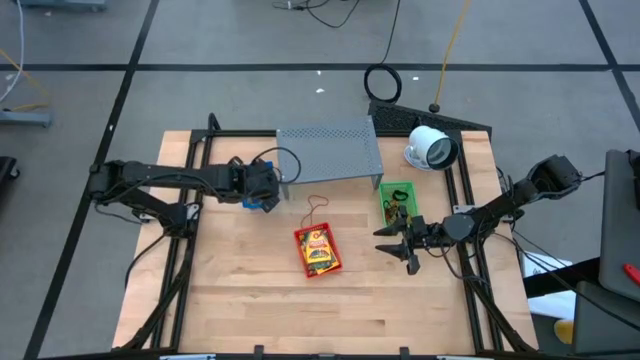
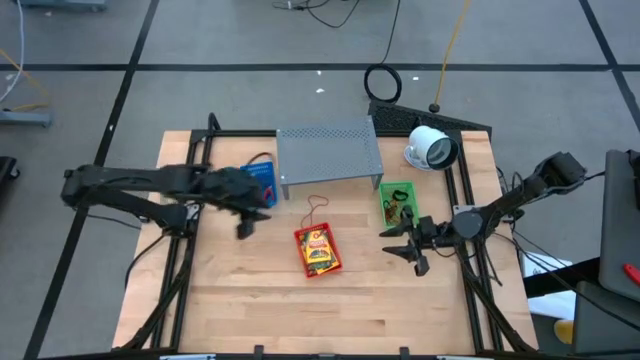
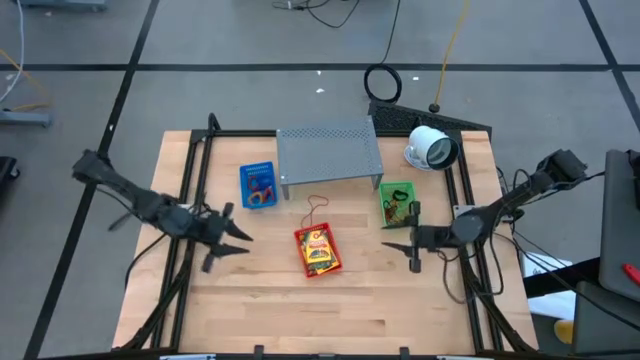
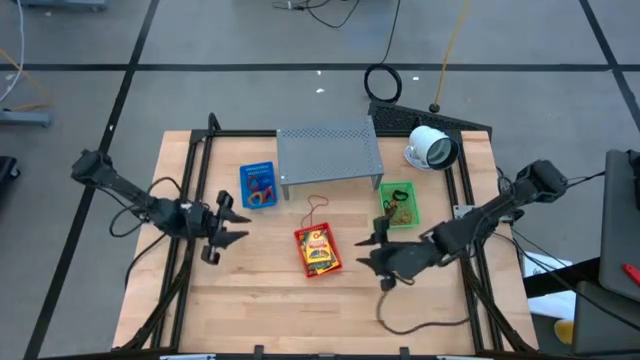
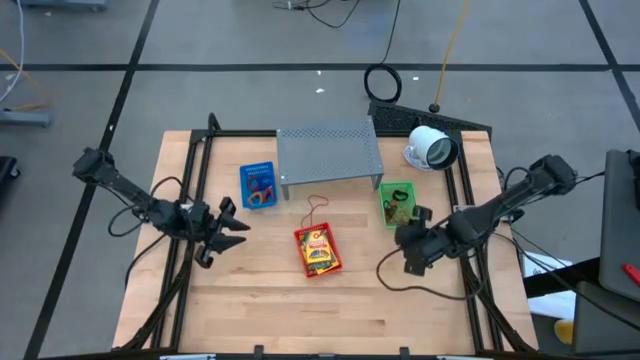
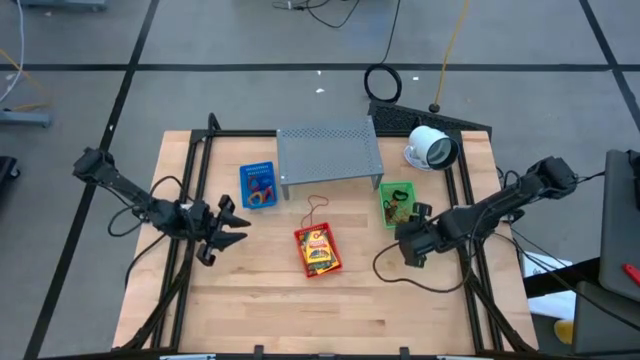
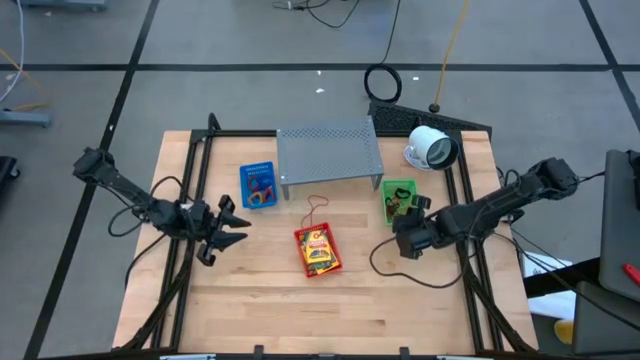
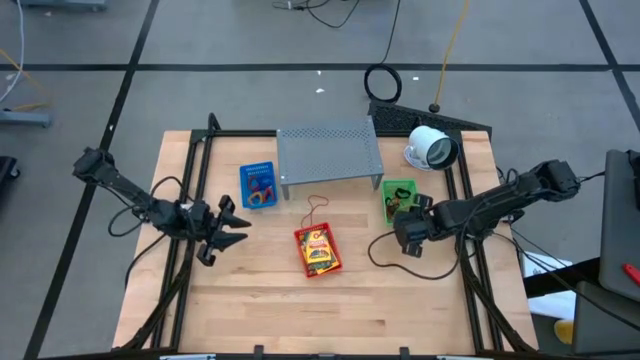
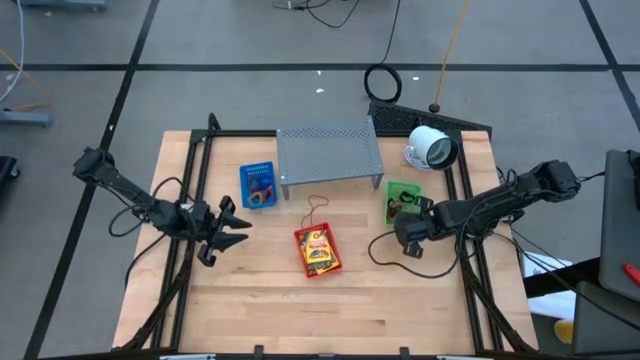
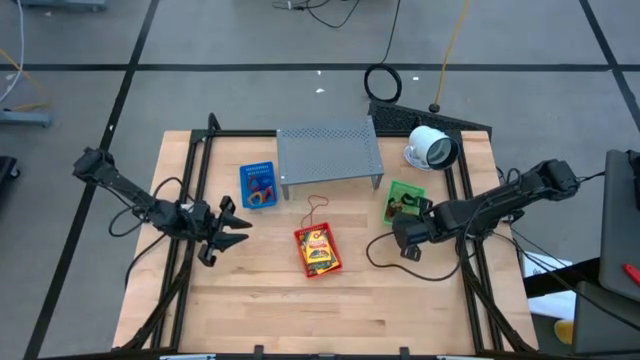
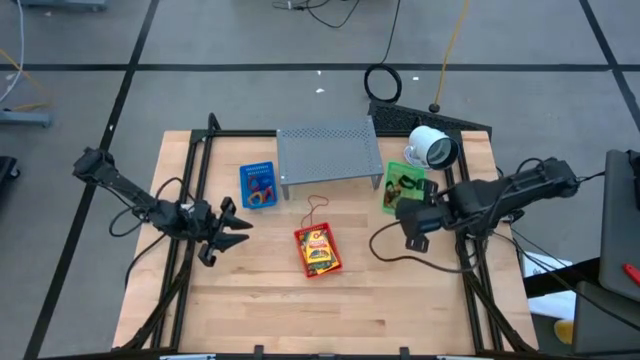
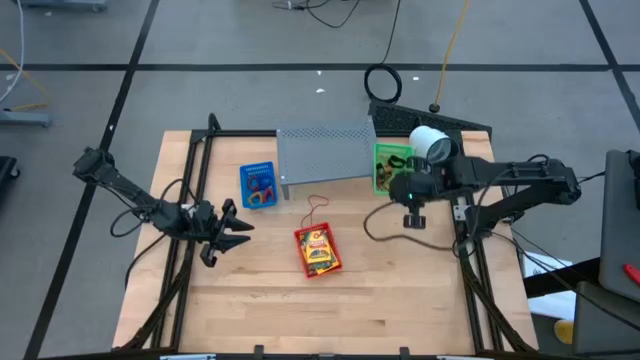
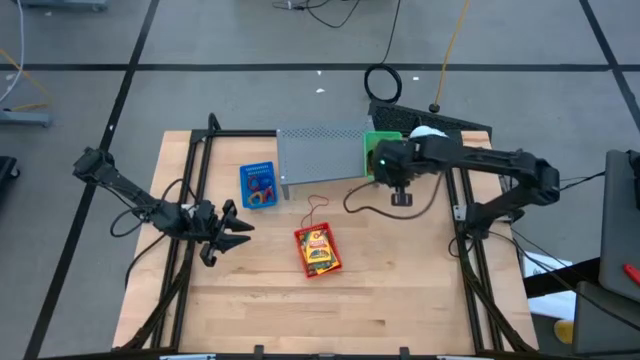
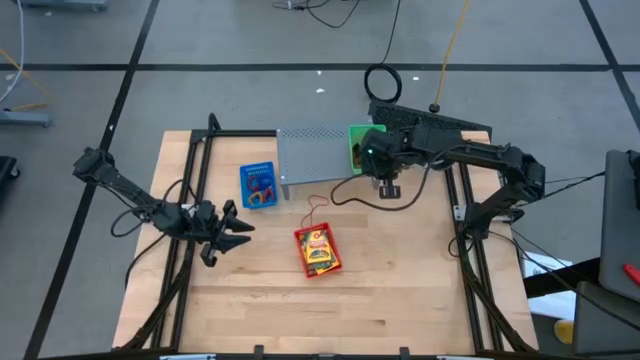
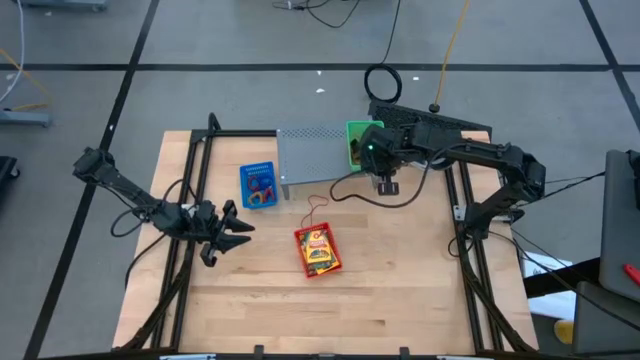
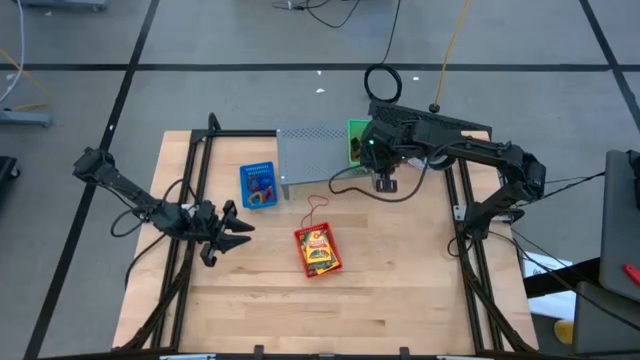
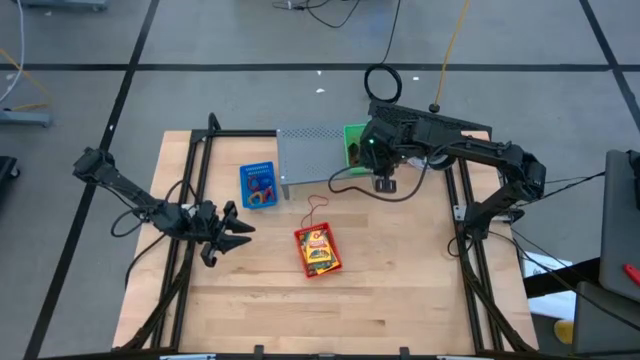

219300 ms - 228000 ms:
Task: Pick & Place Office Desk Supplies
Put the green bin on the shelf

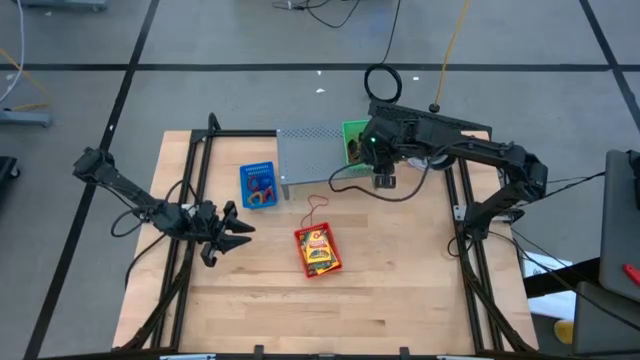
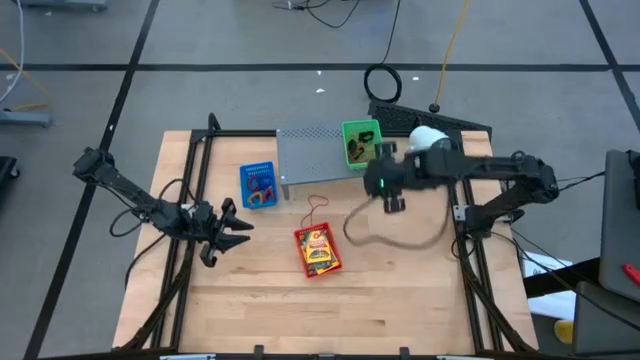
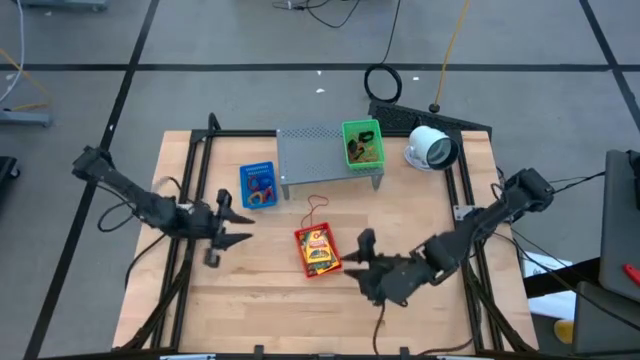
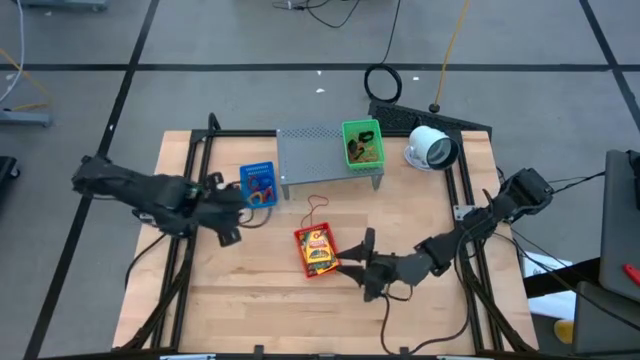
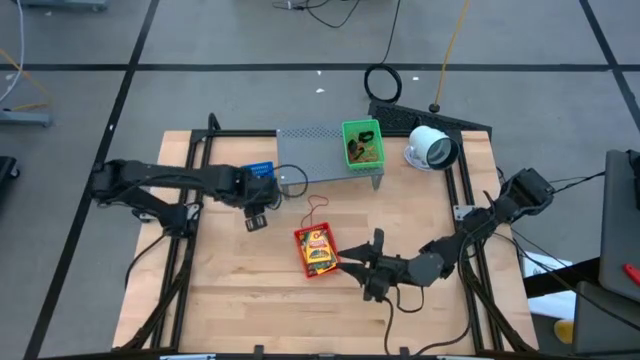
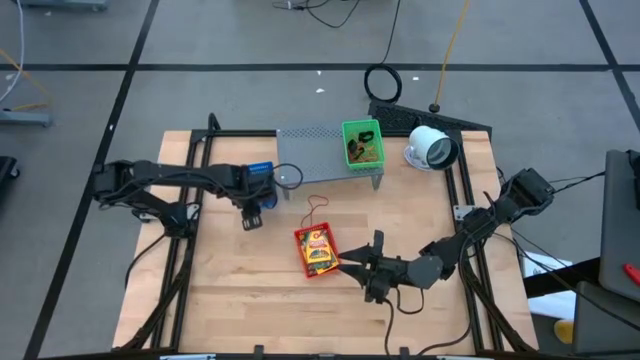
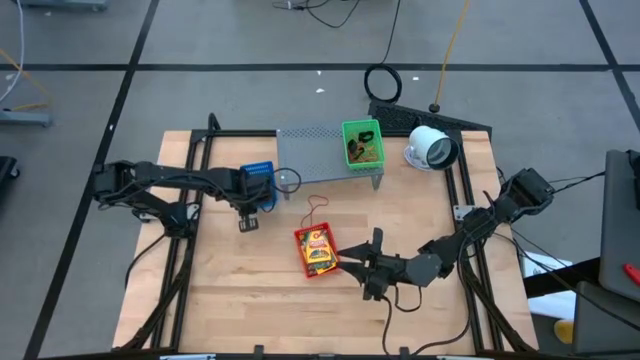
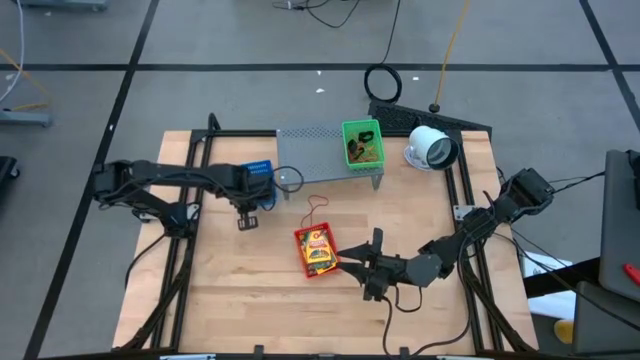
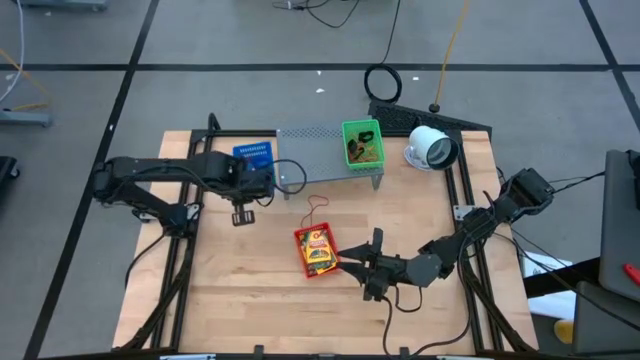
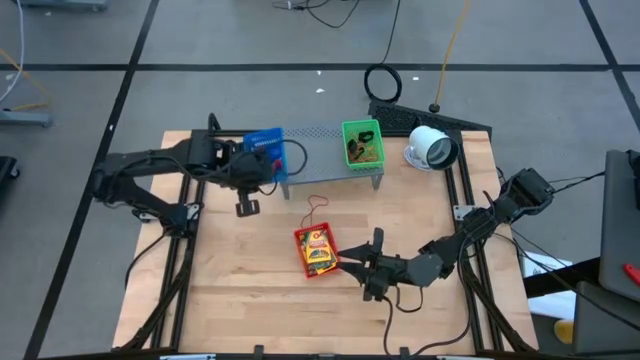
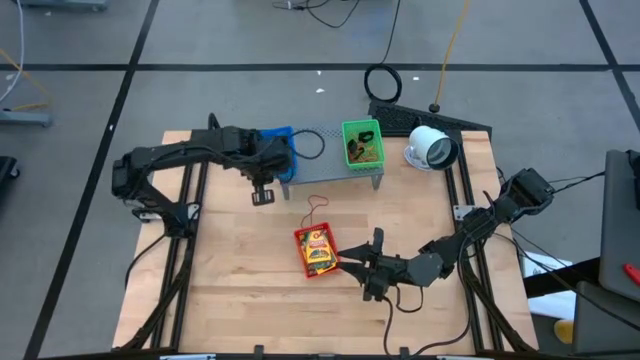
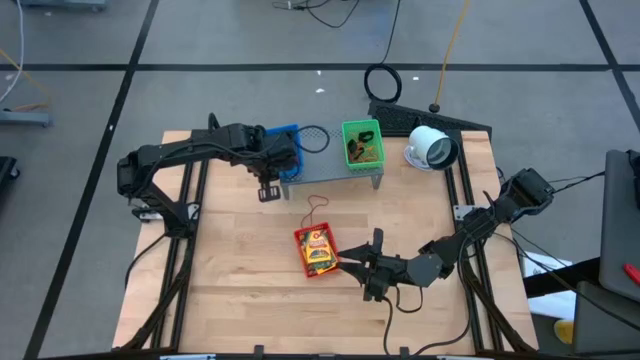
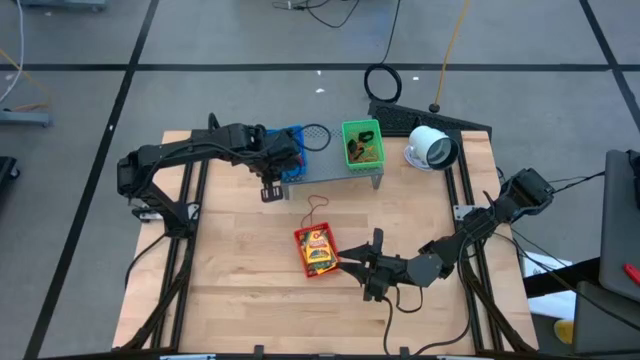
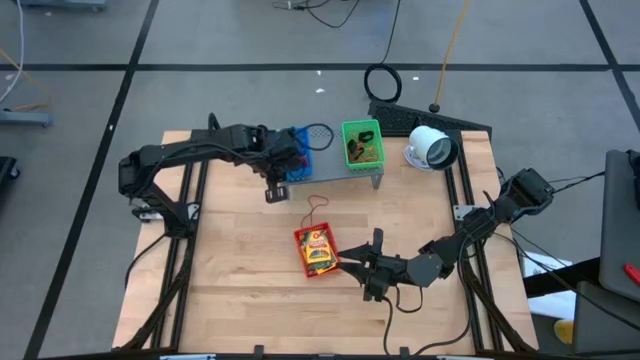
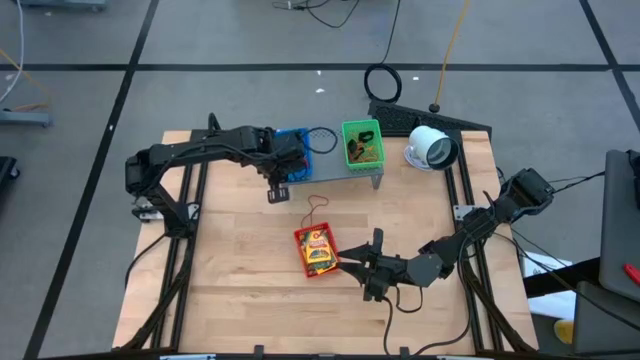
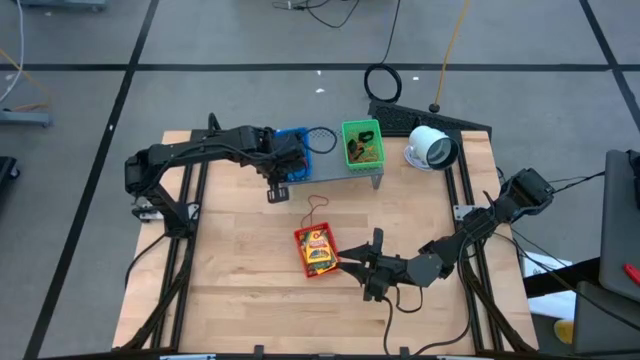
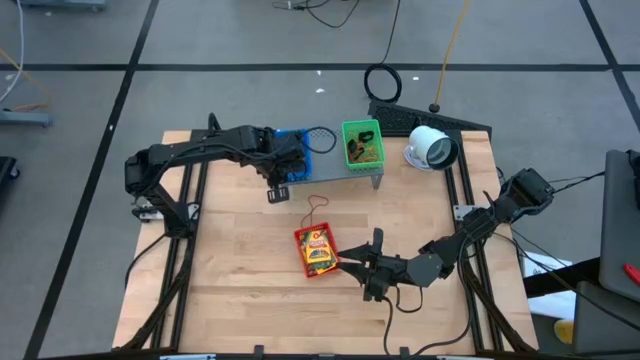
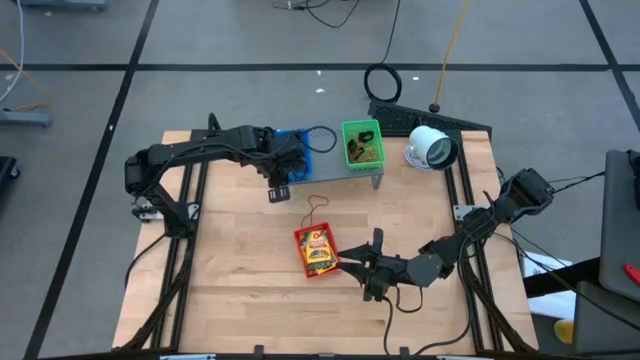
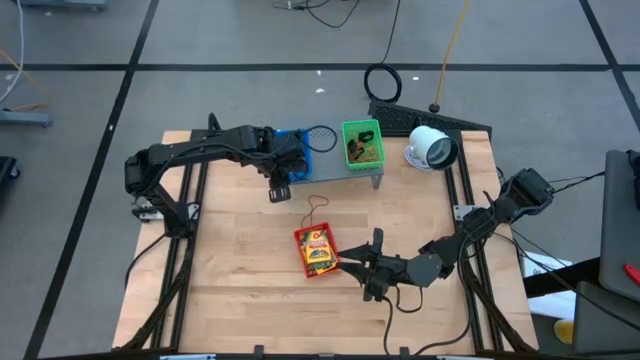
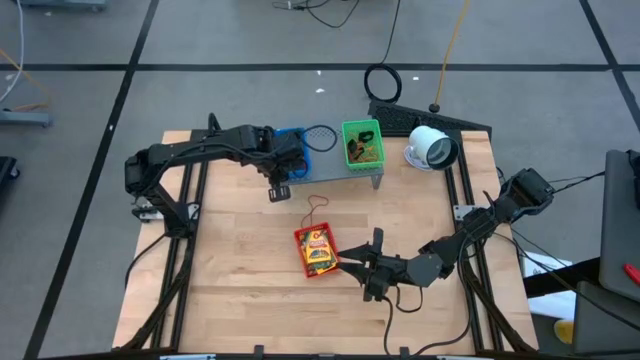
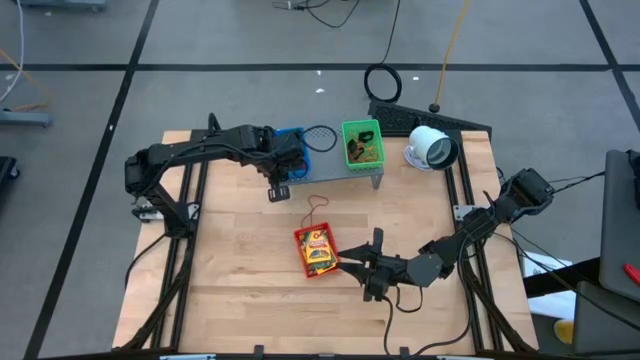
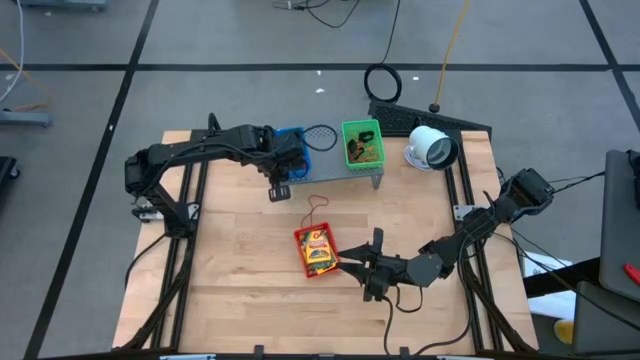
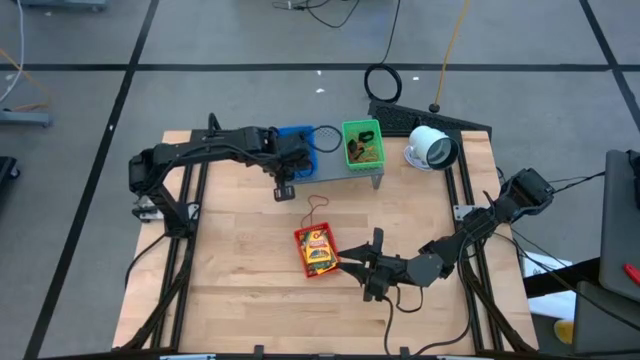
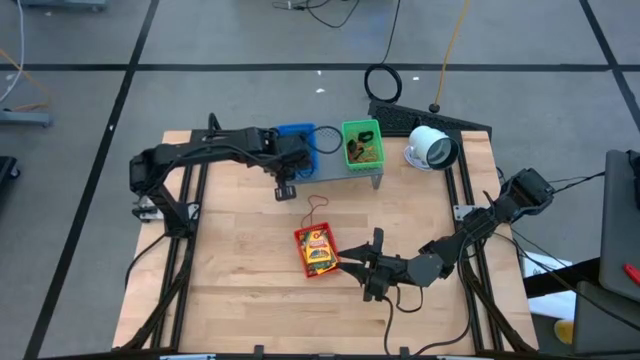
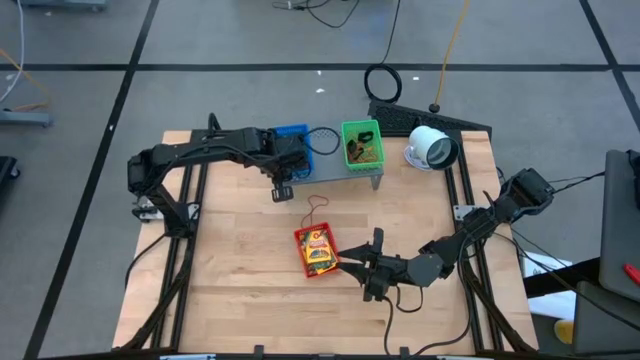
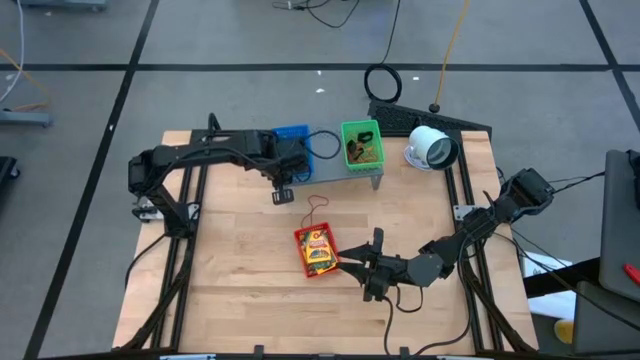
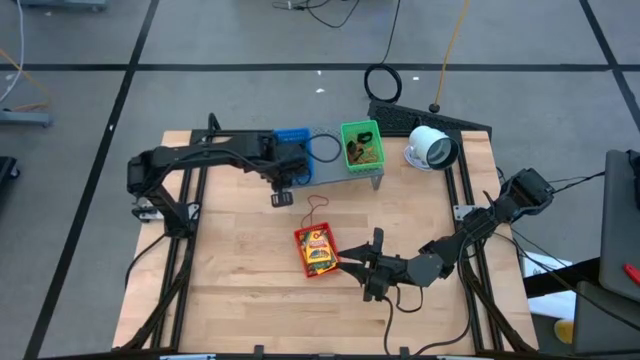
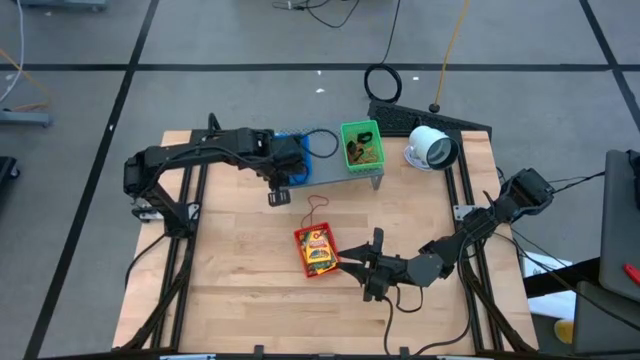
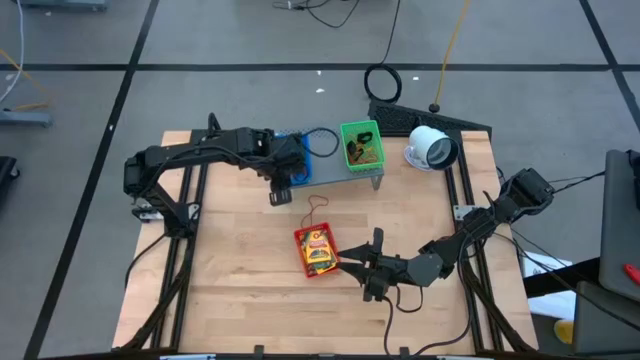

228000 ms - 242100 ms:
Put the blue bin on the shelf
